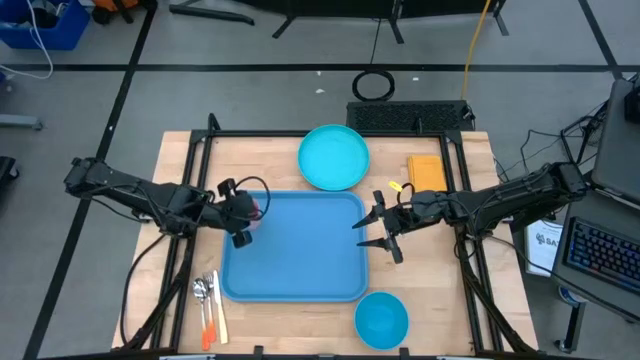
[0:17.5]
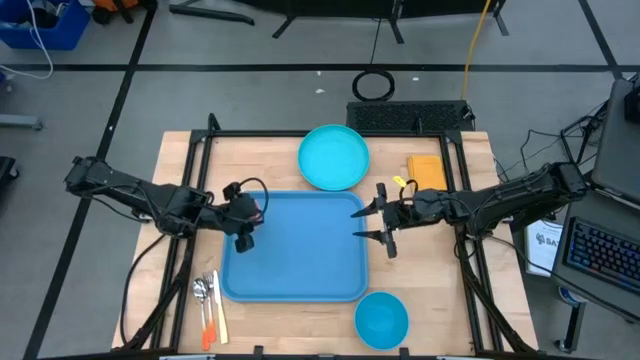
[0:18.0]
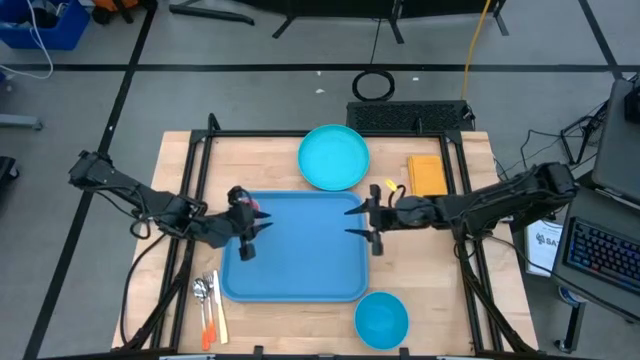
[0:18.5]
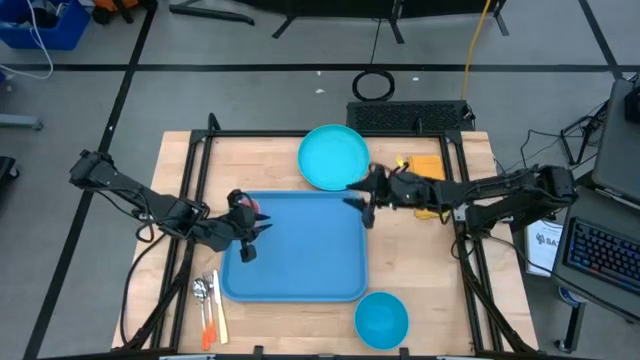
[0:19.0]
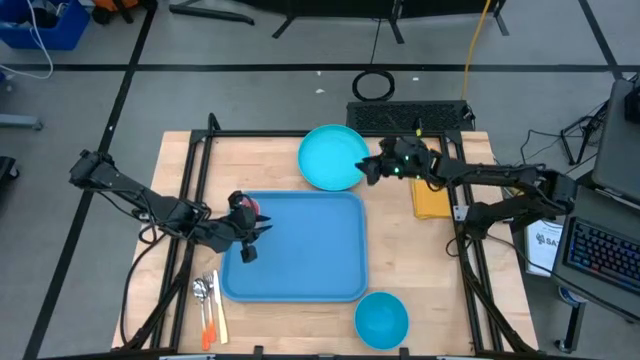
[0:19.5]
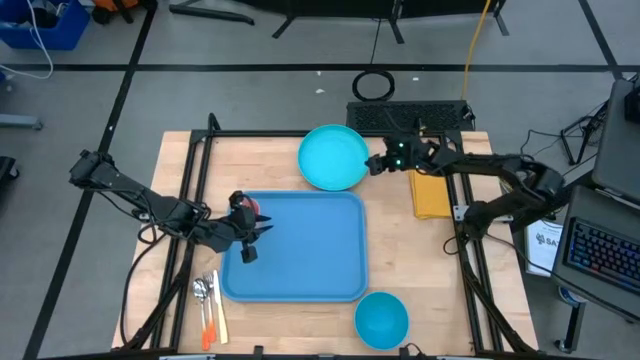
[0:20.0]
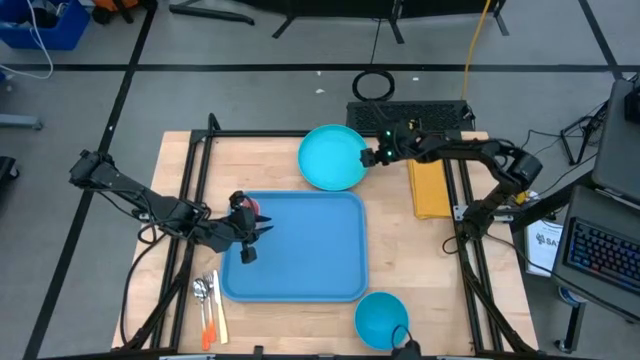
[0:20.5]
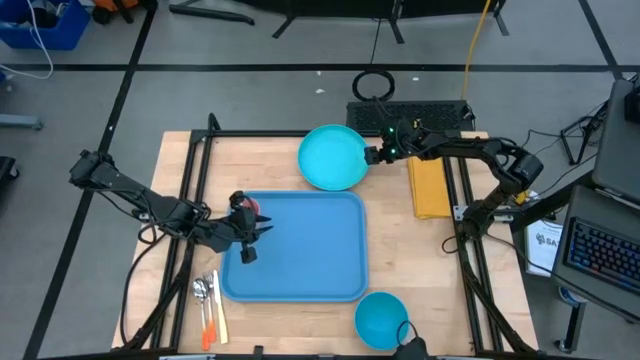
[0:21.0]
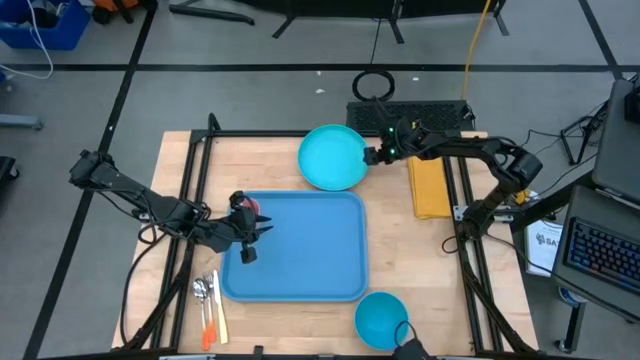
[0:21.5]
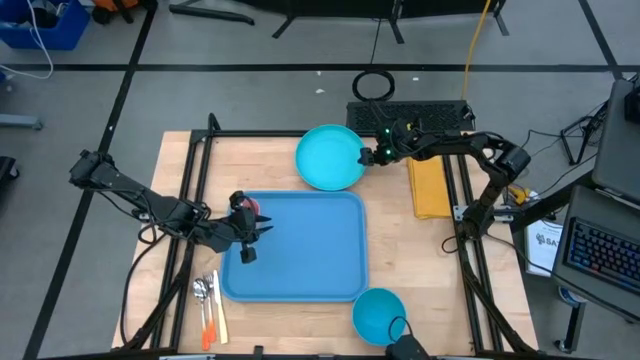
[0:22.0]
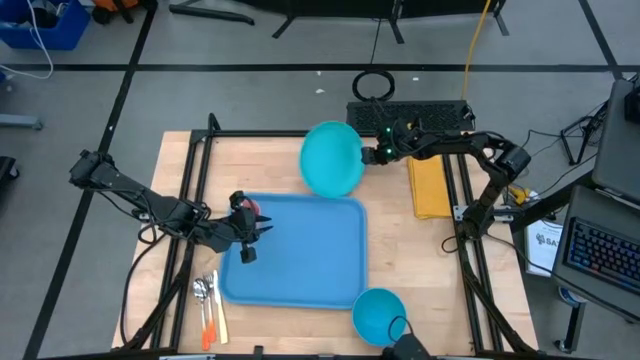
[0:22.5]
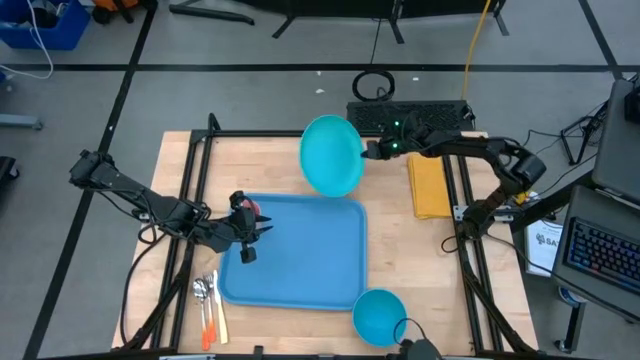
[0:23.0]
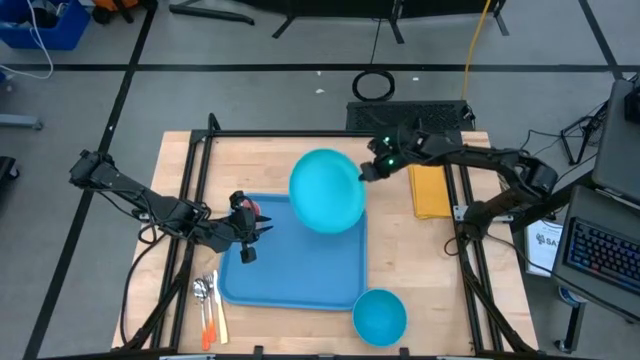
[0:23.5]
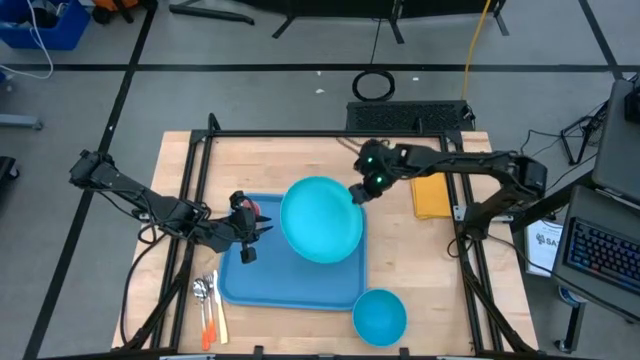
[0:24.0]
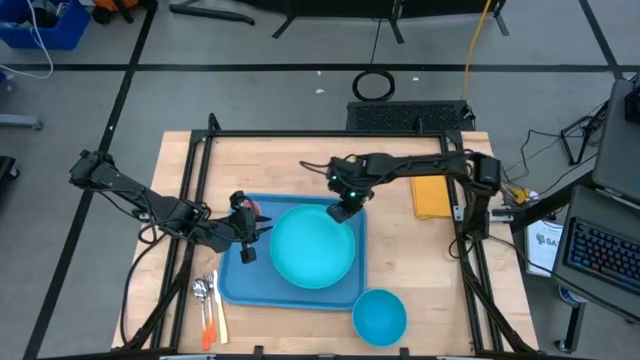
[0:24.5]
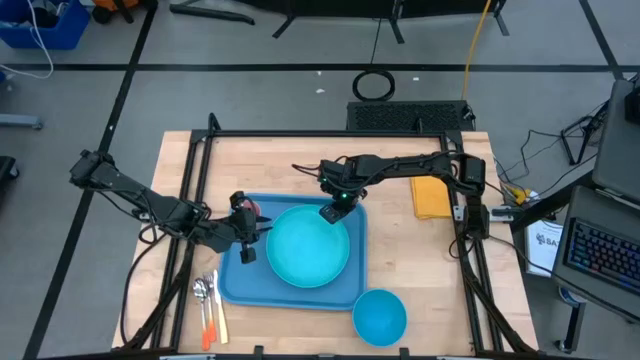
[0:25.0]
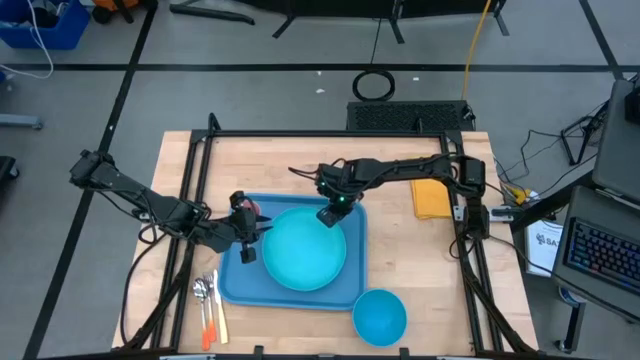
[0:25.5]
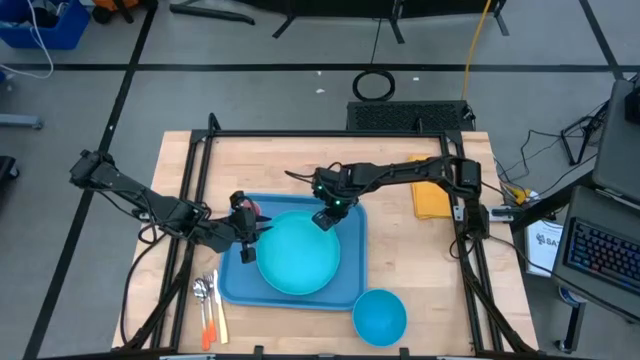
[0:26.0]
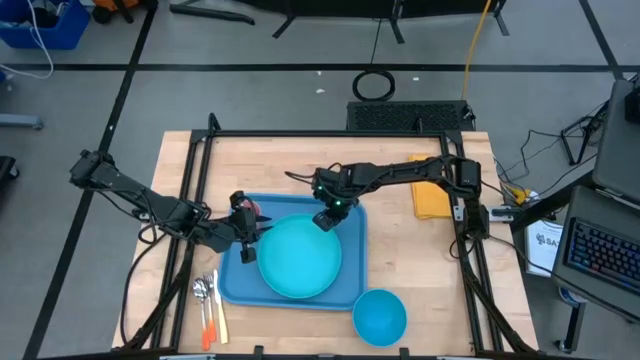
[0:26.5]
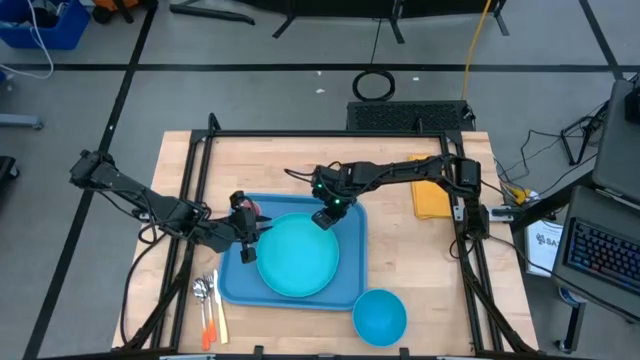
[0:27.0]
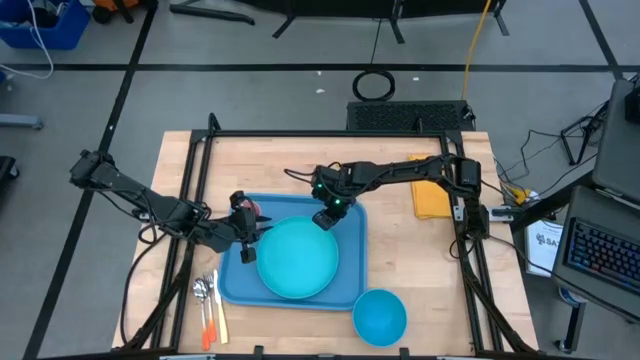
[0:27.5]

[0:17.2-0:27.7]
Task: Set up tray
Put the light blue plate in the bottom center of the blue serving tray

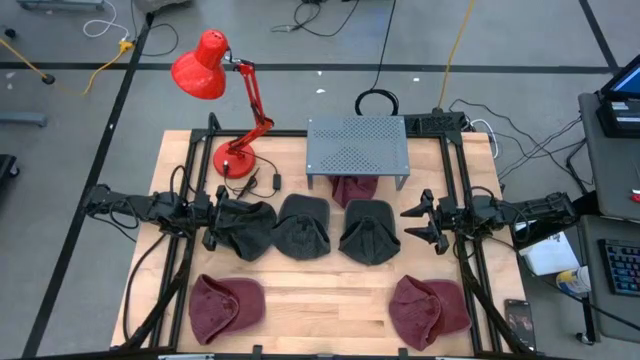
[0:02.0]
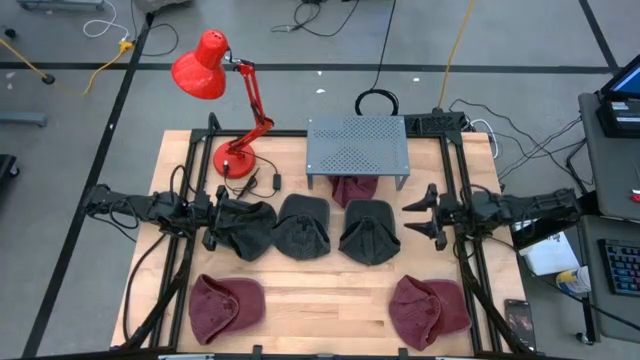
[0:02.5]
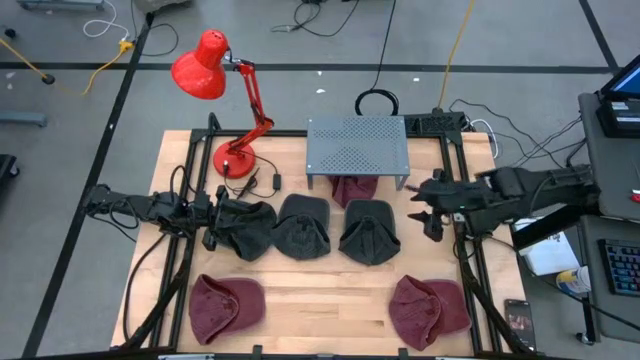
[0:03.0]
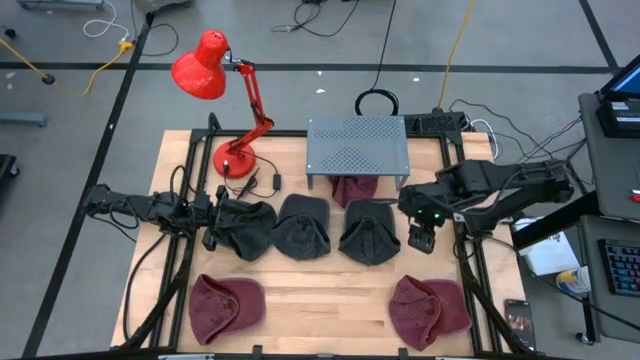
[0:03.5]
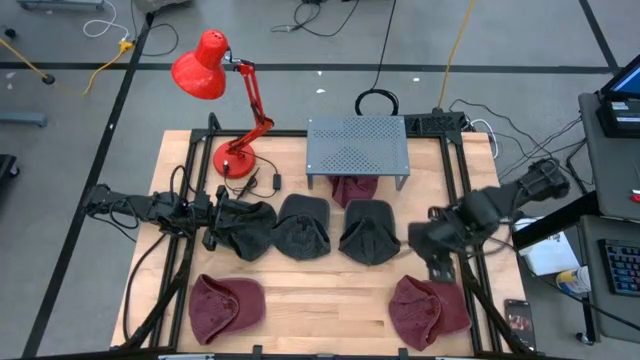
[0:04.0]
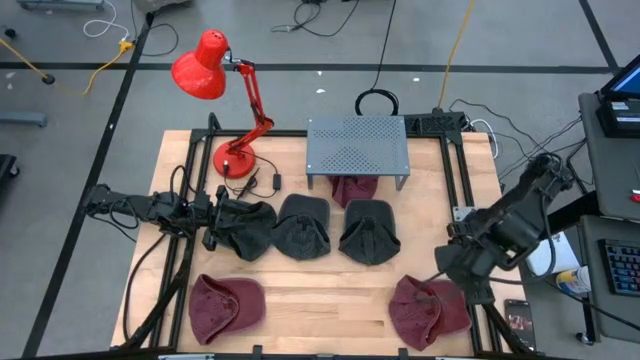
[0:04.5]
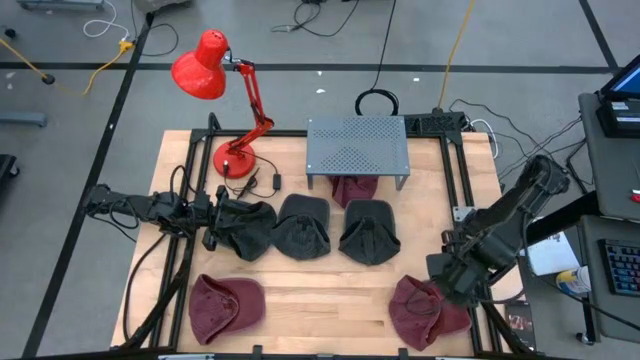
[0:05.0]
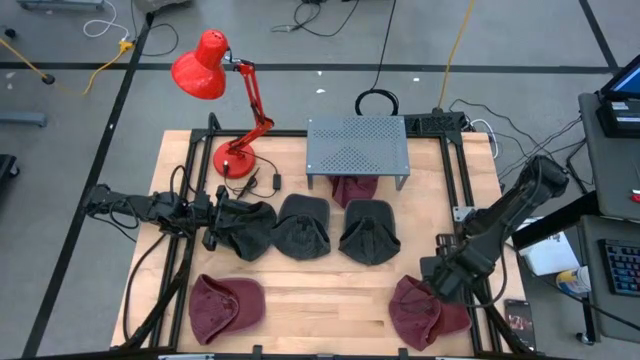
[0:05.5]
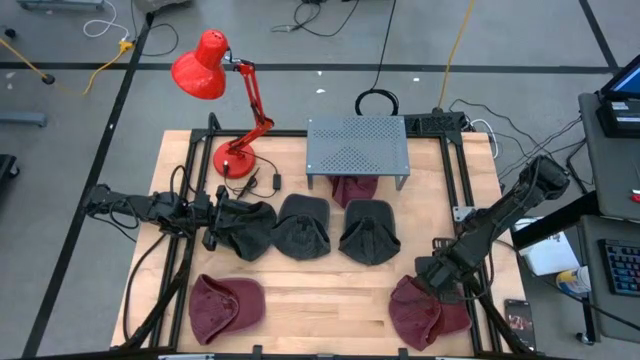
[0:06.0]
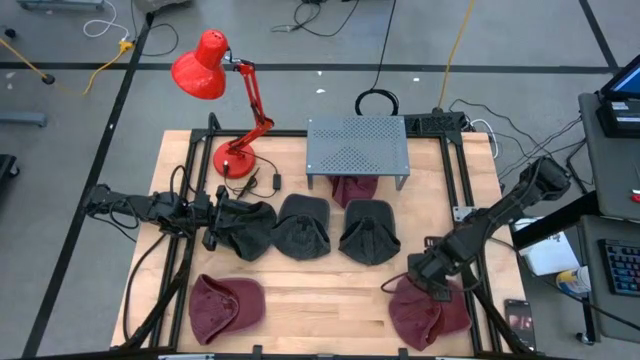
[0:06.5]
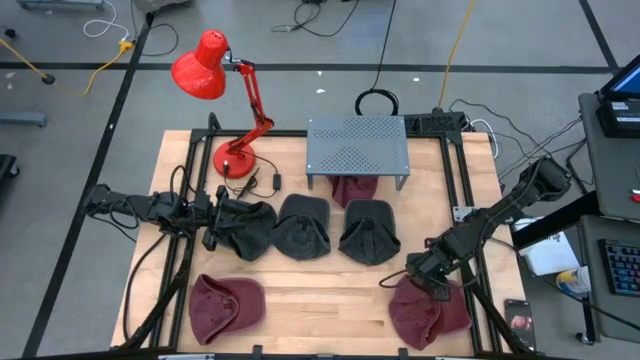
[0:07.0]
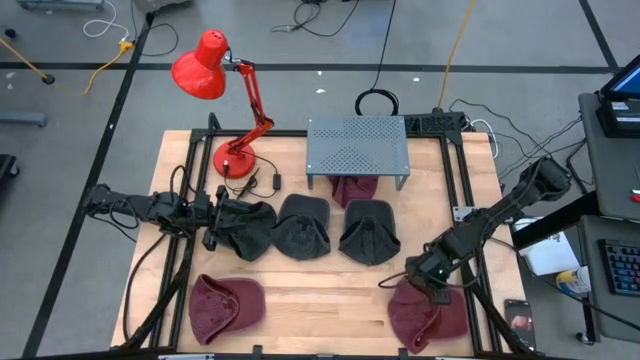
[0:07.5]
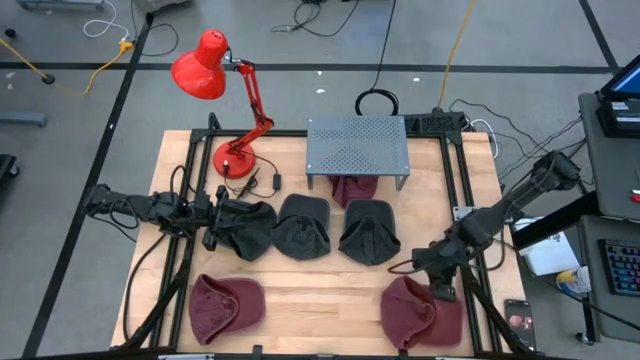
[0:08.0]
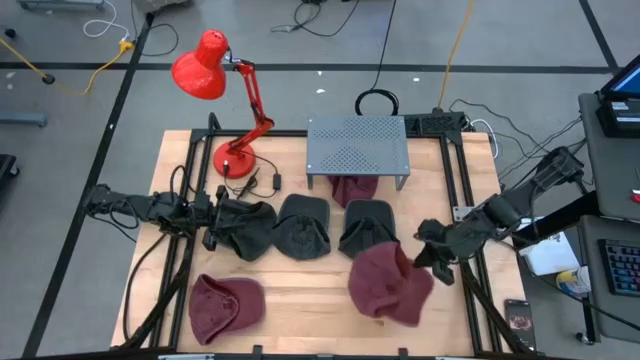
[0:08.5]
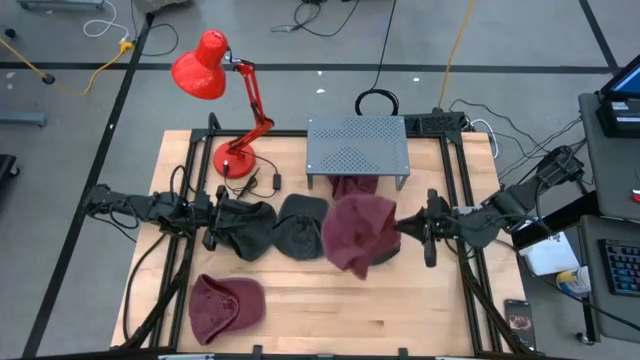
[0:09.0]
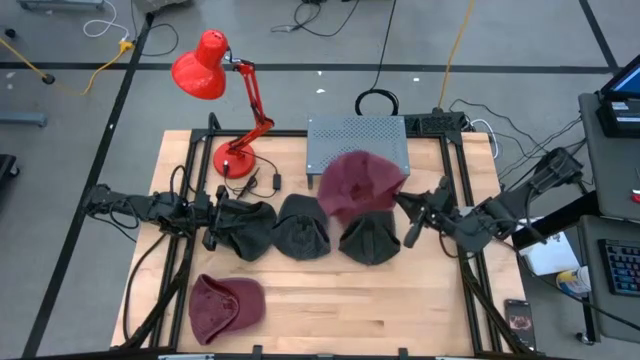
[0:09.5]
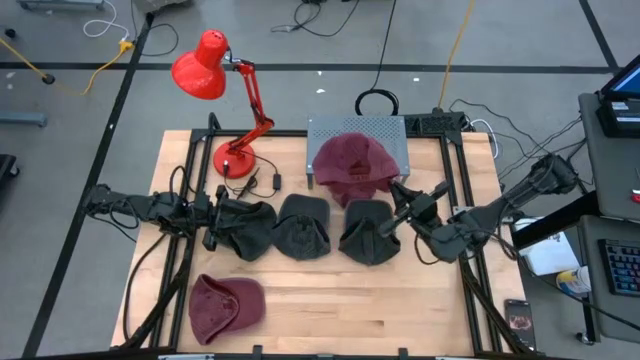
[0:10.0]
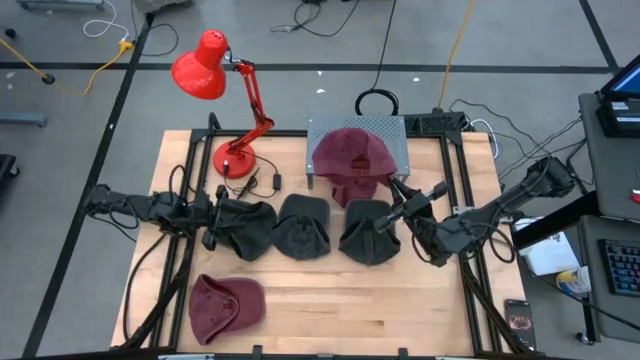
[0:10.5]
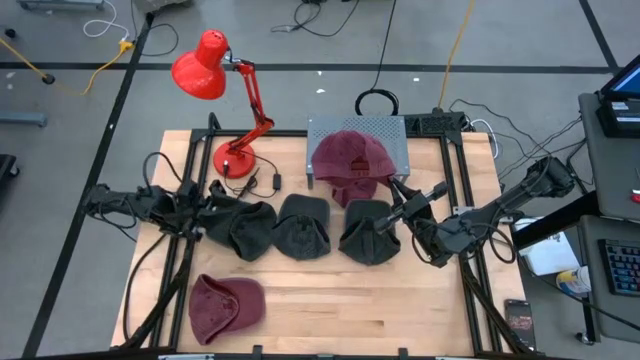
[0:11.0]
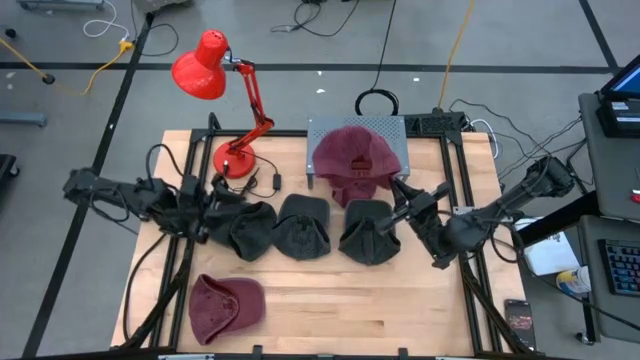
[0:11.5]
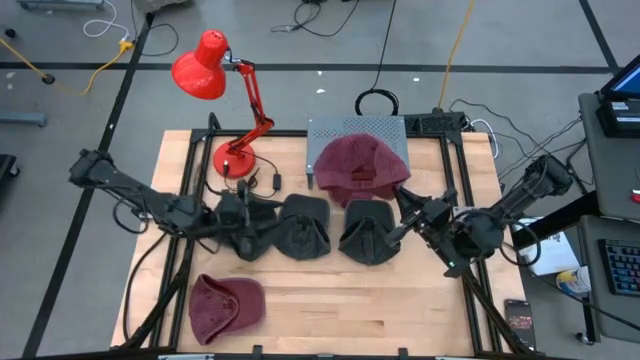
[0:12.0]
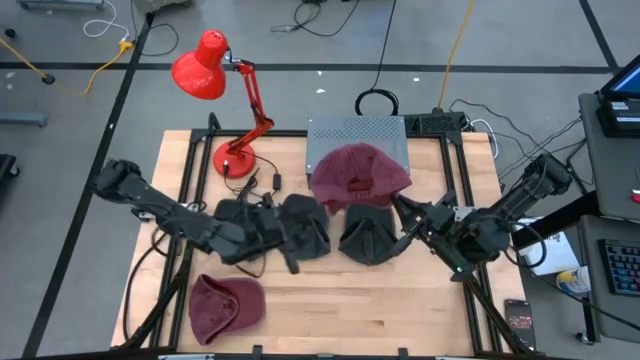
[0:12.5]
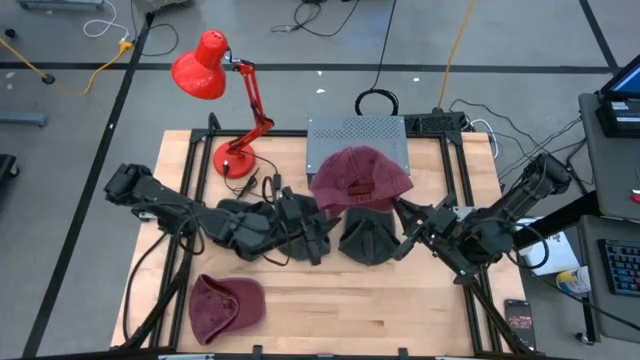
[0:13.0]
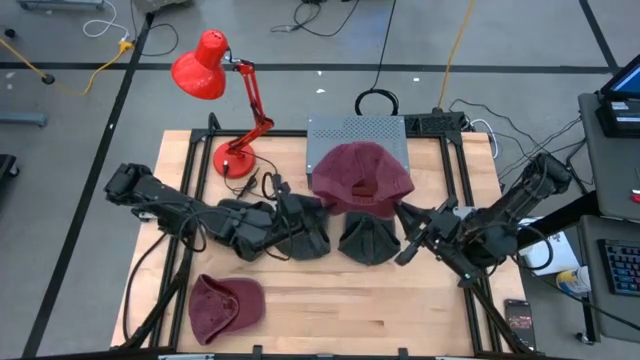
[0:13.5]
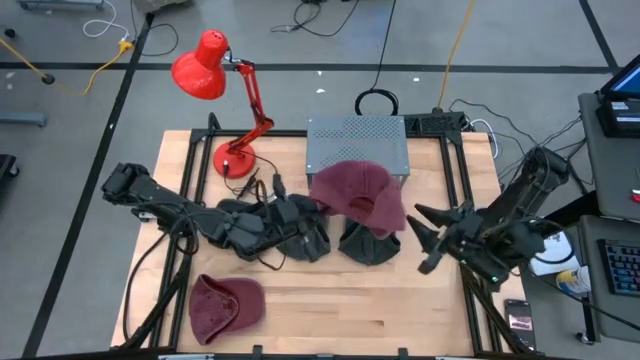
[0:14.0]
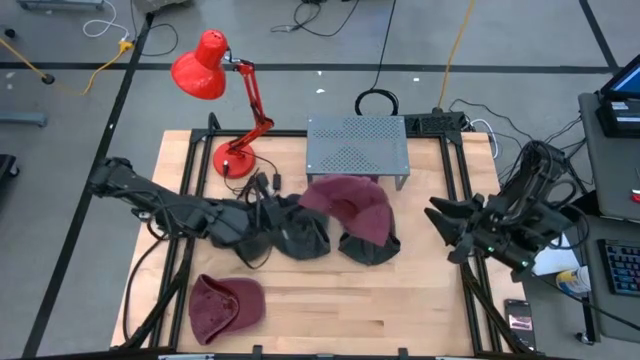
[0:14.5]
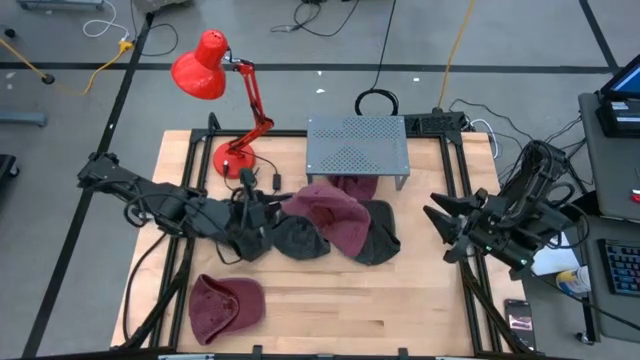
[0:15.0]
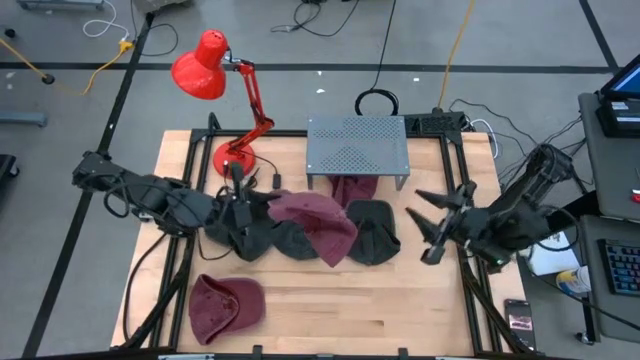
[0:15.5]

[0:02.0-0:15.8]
Task: Pick & Place hat
Put the bottom right cap on the shelf
